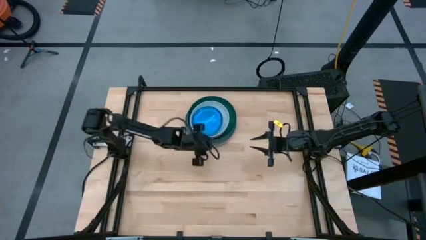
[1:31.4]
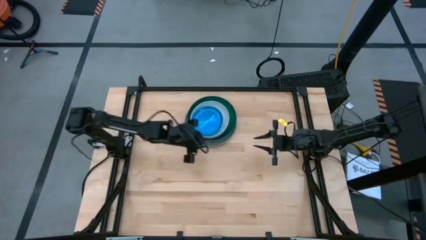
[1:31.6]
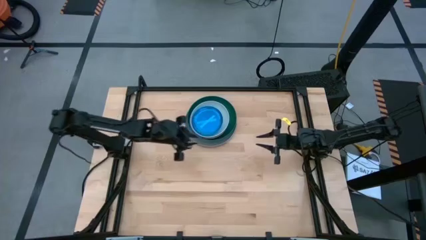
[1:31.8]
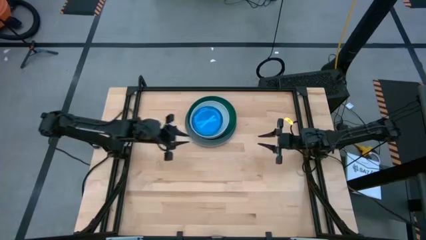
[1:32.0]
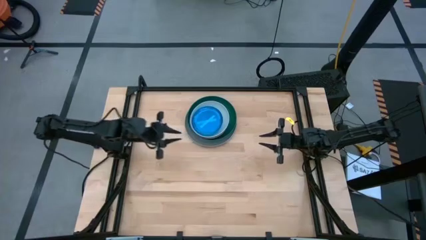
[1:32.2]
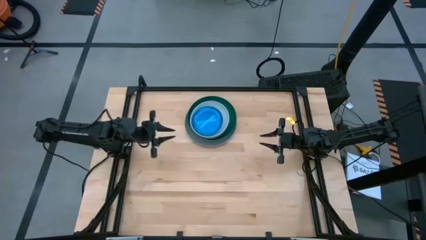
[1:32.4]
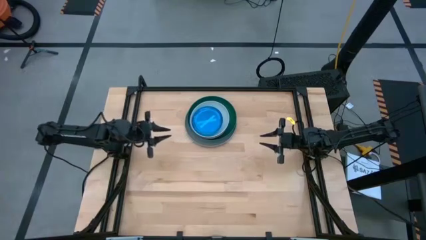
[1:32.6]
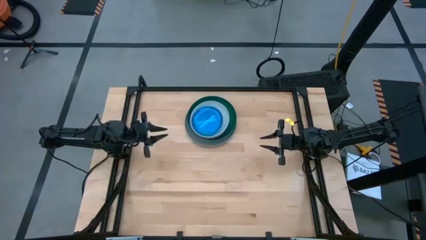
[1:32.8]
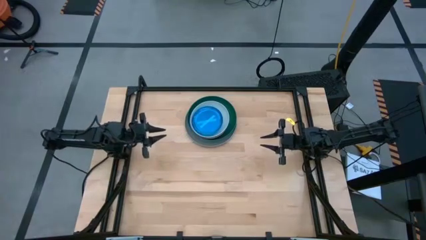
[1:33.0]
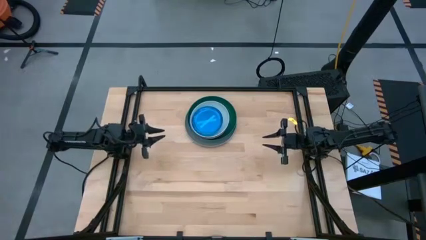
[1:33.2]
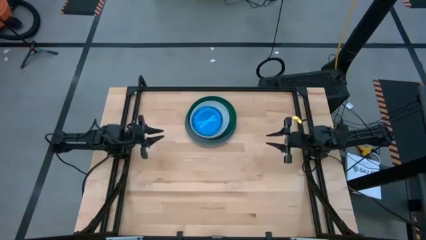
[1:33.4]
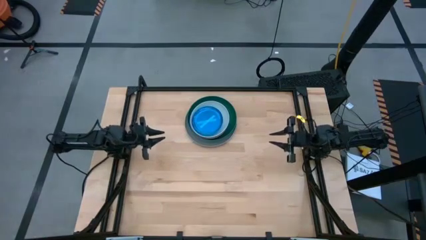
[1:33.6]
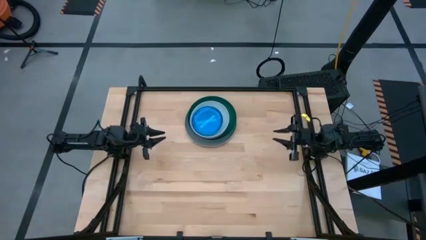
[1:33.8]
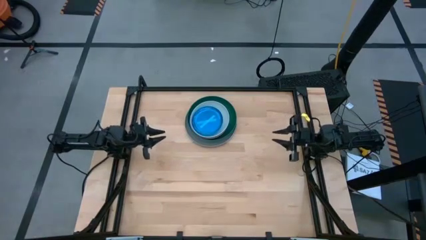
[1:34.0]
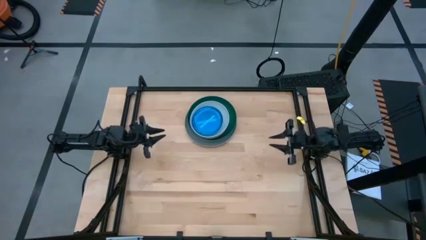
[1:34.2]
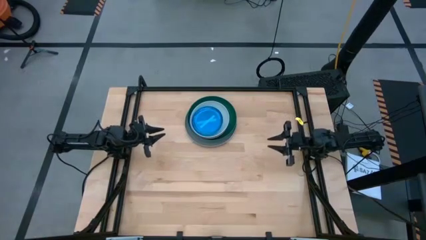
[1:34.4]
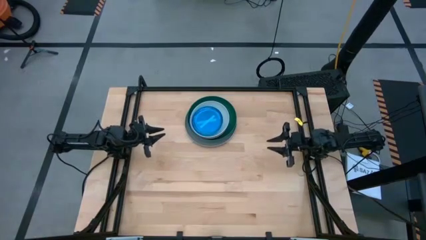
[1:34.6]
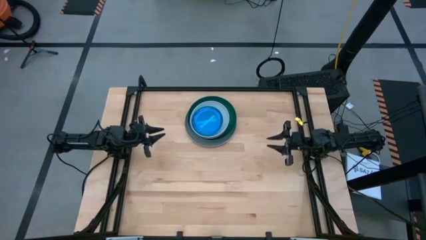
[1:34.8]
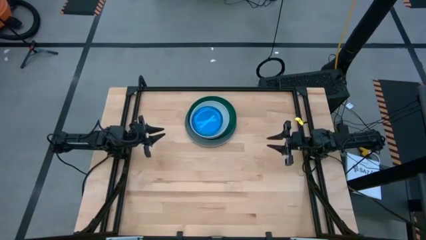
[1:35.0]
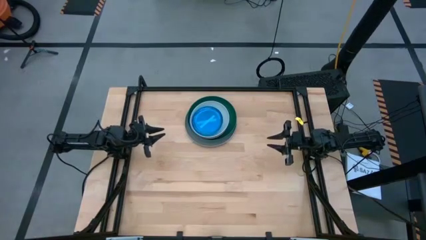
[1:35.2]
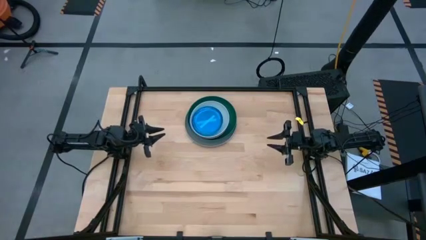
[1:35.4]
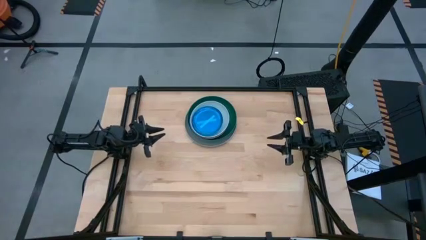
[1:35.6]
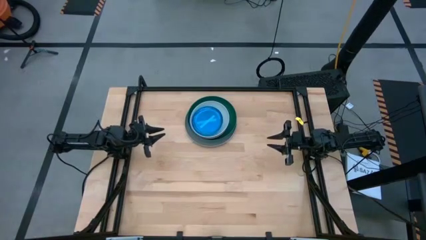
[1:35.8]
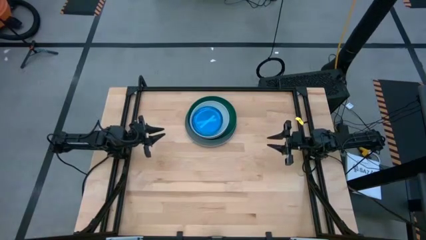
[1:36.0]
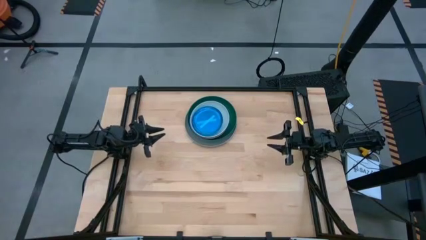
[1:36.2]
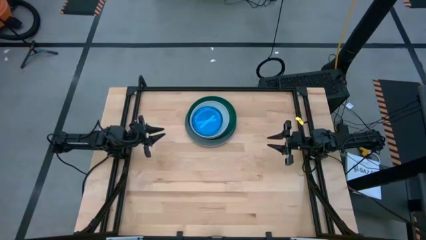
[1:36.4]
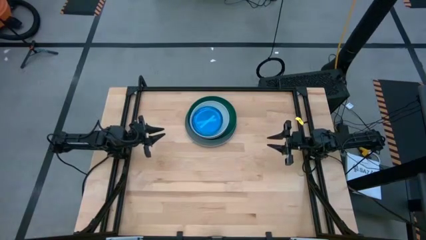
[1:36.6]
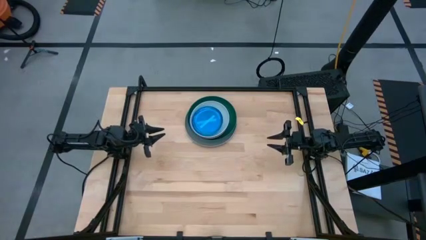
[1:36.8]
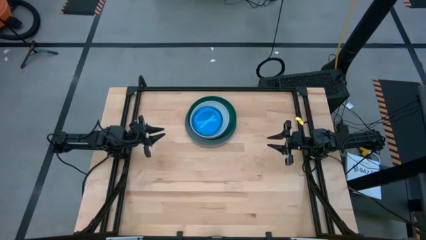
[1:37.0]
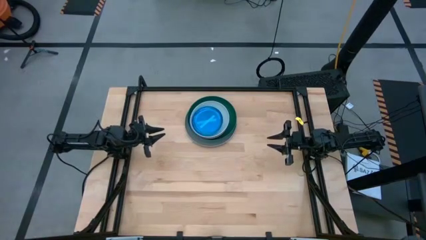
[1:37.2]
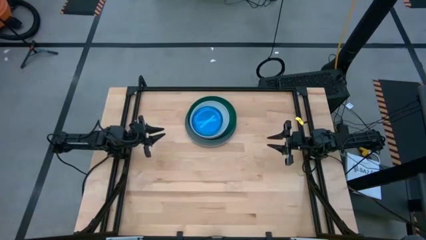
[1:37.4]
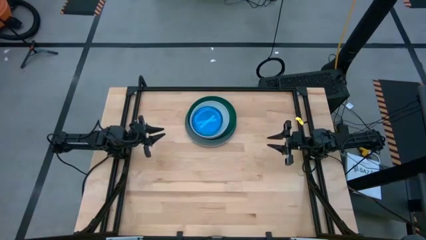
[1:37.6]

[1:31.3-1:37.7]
Task: Stack plastic plates
Return to Home Position

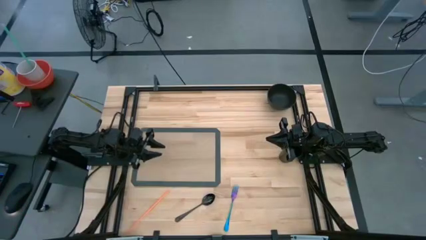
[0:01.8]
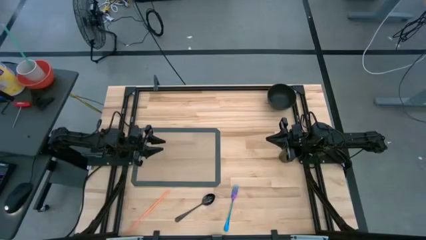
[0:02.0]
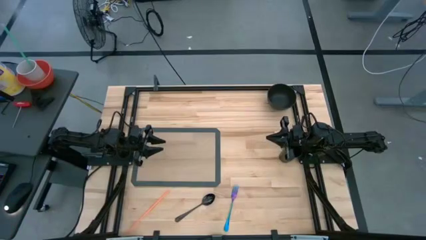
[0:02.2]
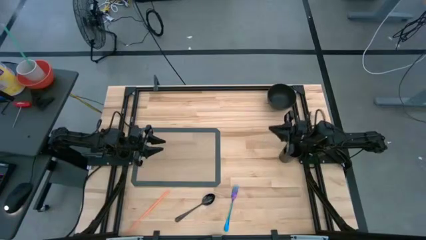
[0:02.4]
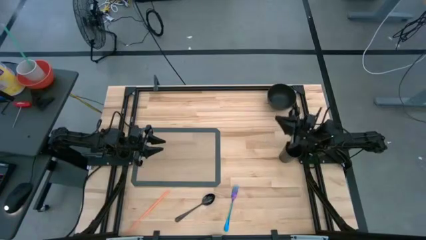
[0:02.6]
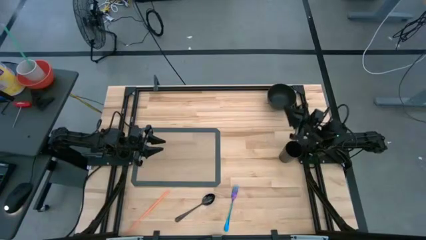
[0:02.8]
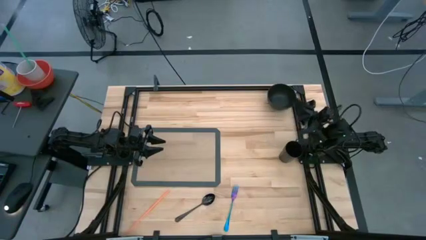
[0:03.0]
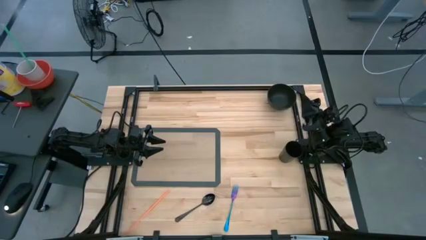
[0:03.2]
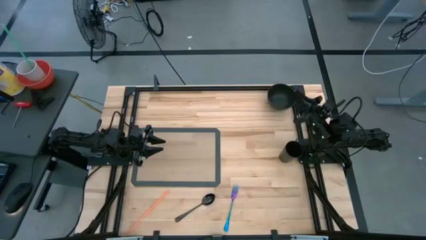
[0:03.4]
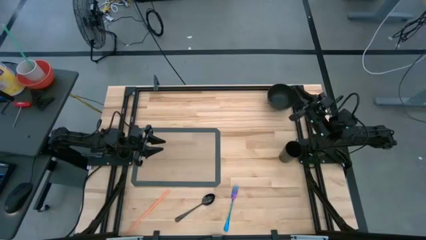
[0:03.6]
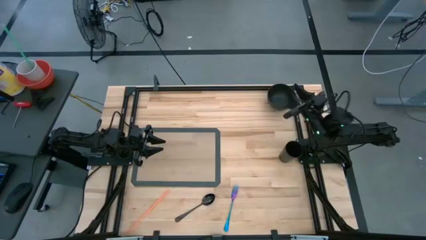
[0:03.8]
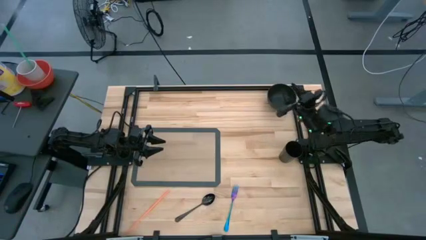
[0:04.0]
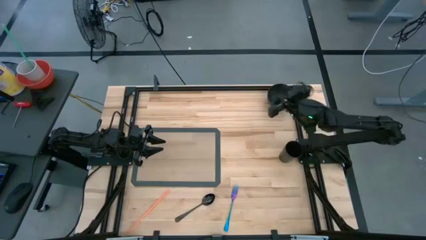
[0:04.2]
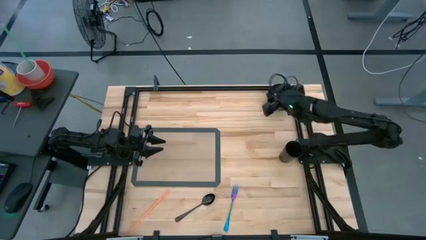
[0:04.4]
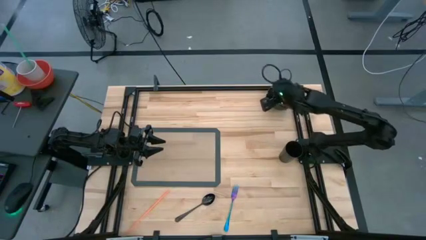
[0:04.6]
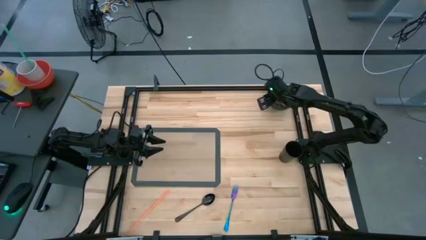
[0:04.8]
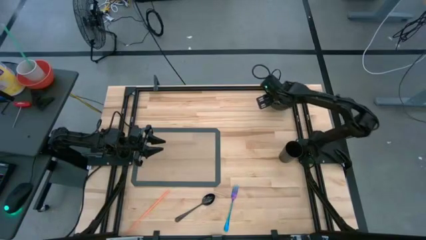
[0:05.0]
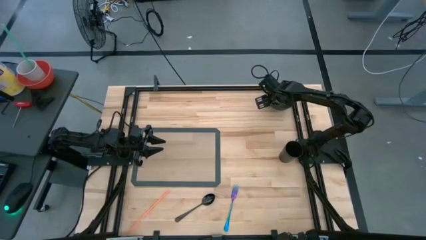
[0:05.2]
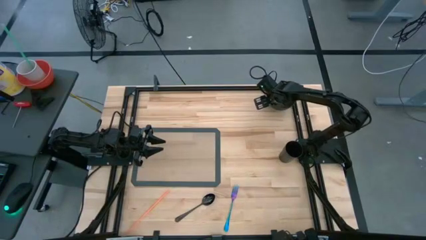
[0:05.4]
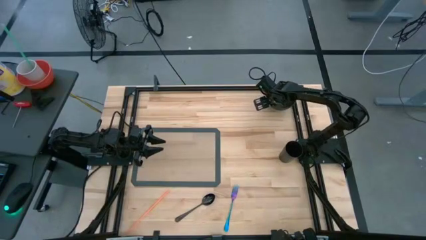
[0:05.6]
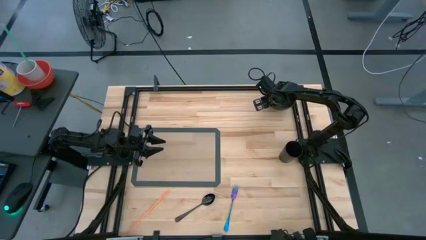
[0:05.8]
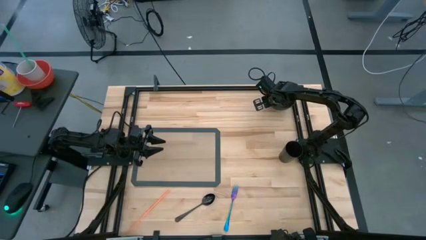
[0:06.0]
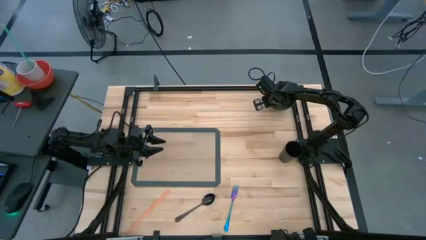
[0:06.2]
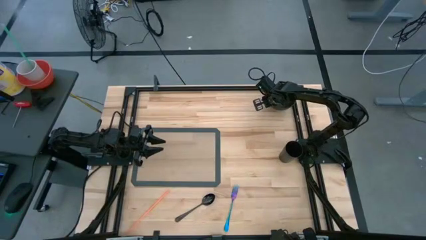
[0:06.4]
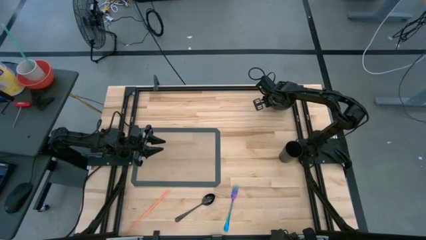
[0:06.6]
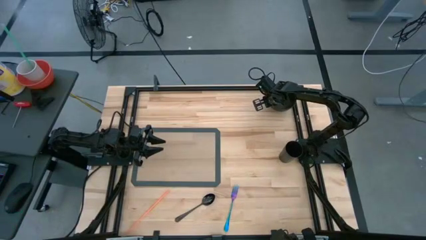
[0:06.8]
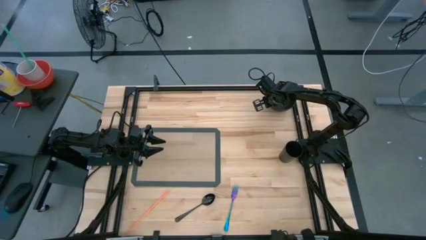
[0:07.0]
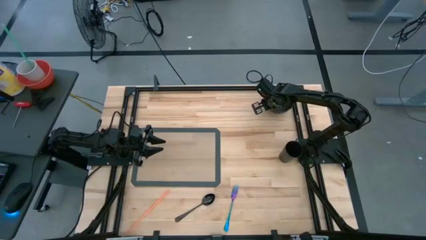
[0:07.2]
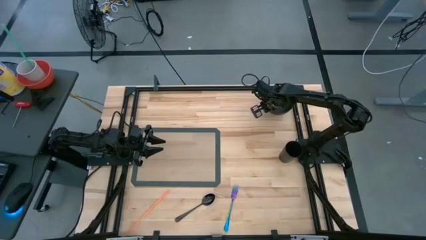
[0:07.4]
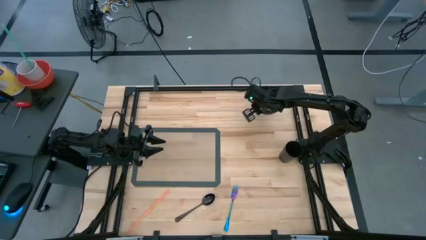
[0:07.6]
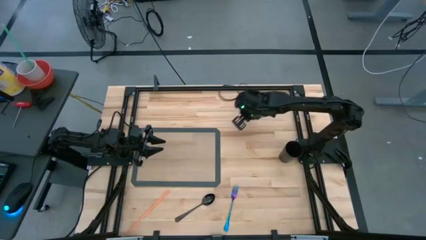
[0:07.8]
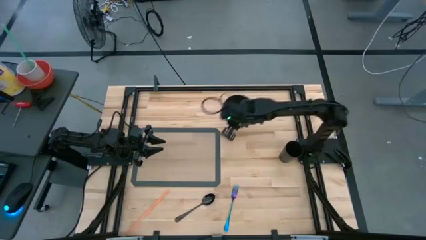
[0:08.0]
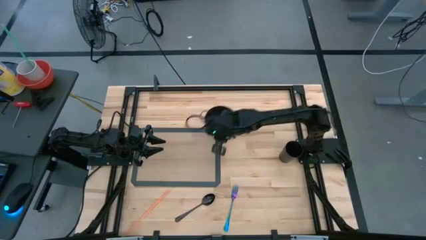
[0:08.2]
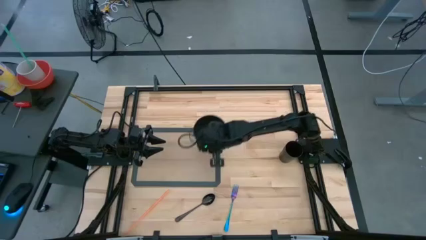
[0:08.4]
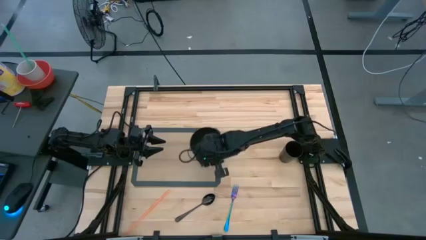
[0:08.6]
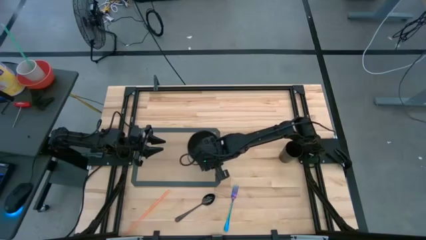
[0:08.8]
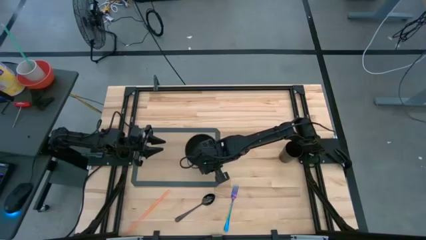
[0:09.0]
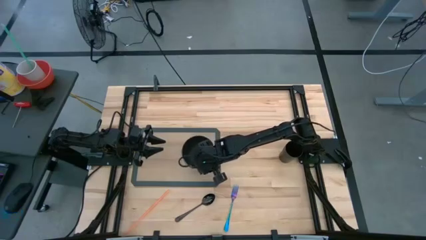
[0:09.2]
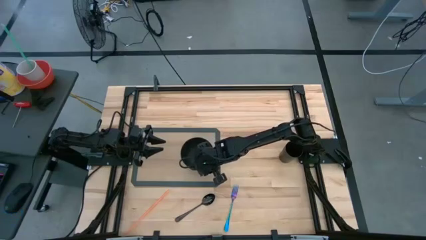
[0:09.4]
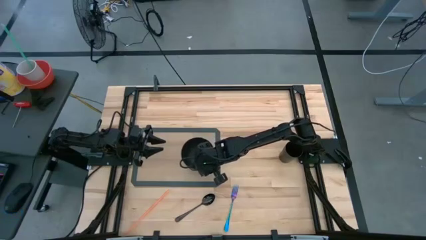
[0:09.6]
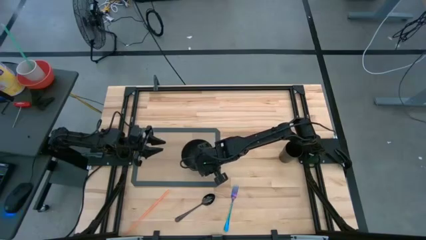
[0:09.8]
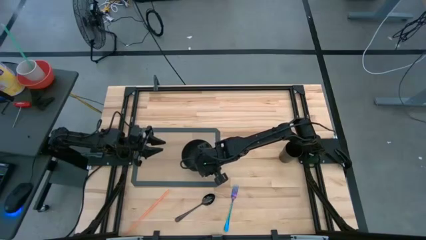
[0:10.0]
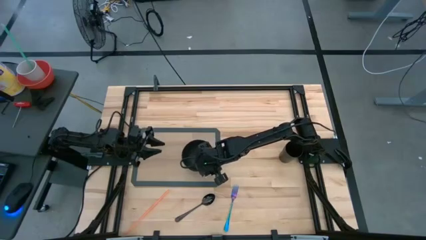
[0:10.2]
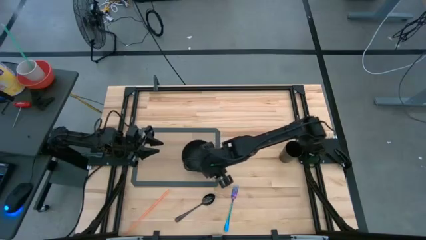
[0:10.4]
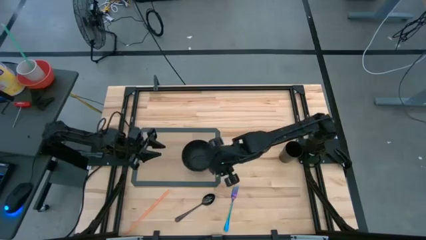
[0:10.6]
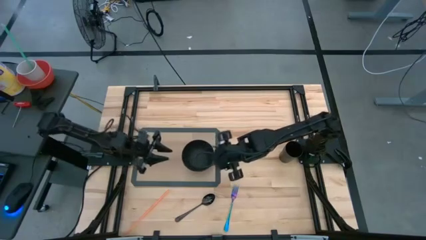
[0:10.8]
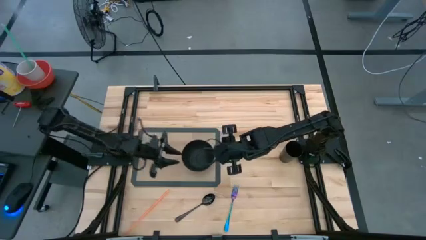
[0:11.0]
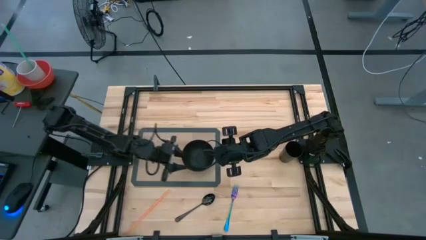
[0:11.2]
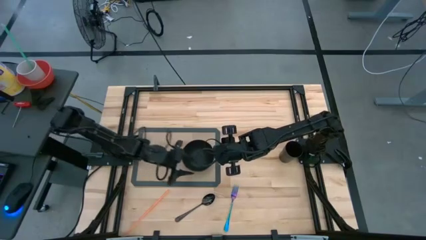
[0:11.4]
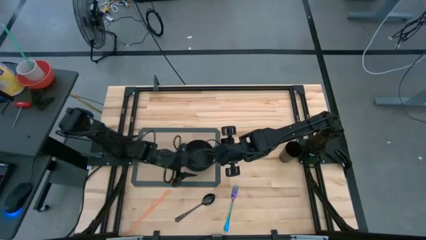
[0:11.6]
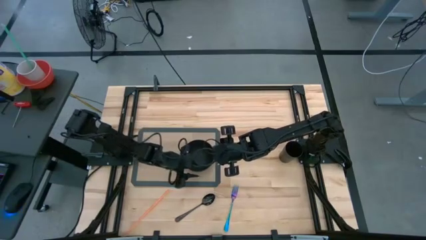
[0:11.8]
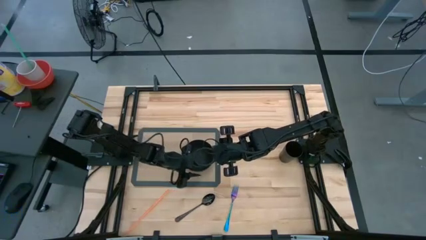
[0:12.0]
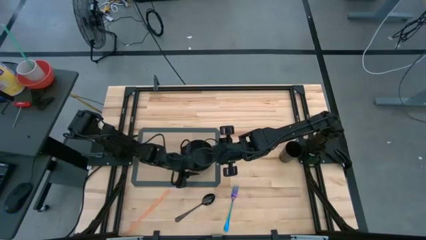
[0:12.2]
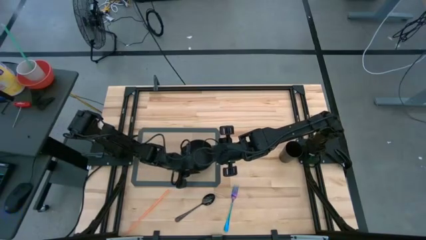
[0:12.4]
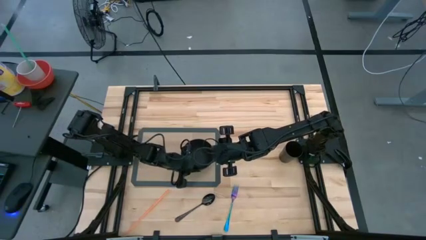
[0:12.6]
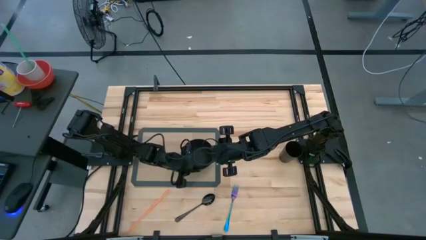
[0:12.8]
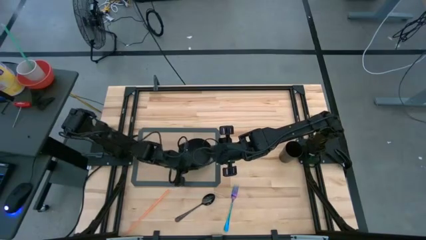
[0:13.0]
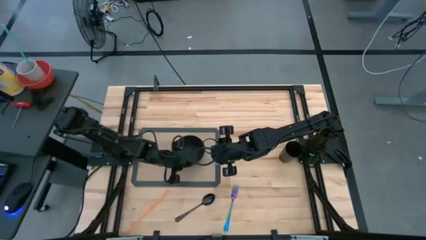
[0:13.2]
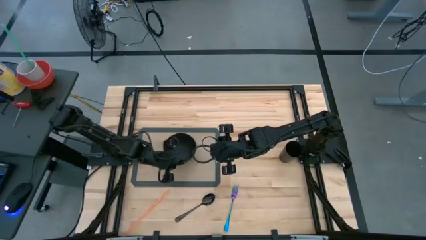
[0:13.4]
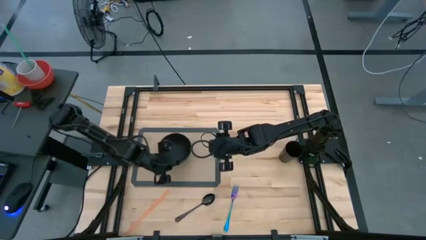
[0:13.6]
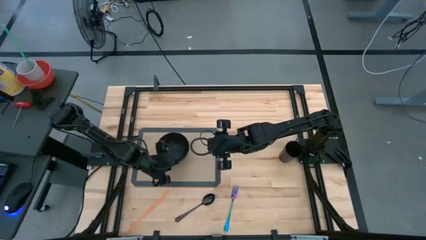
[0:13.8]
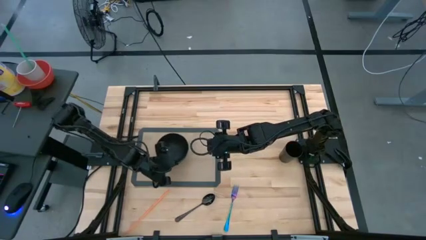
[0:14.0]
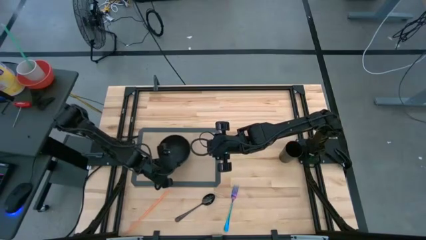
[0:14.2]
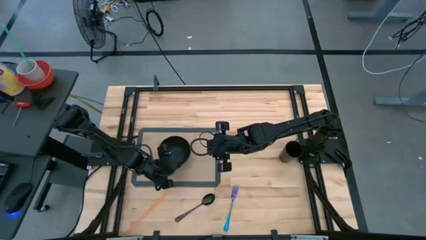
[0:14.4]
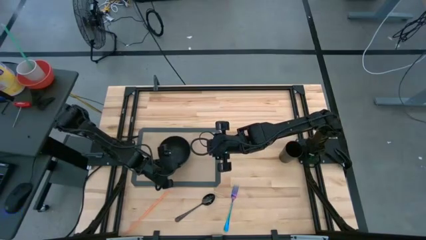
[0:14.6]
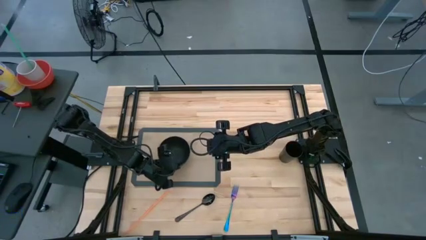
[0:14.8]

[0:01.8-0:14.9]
Task: Pick & Place Utensil
Put the black bowl on the gray placemat
